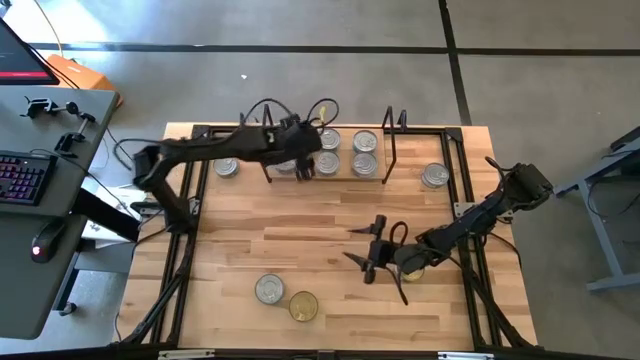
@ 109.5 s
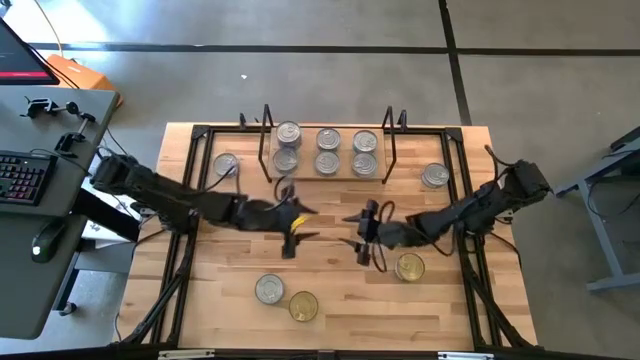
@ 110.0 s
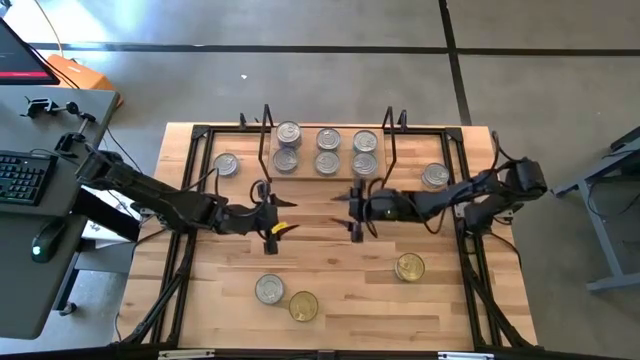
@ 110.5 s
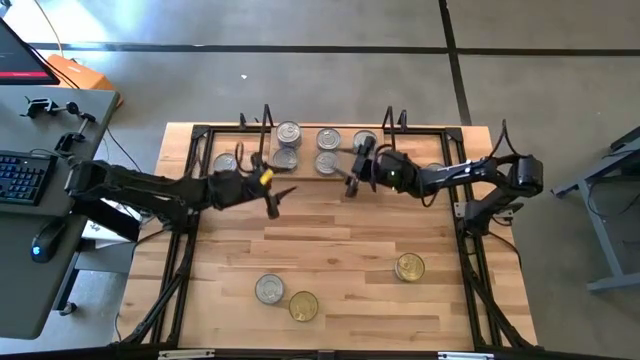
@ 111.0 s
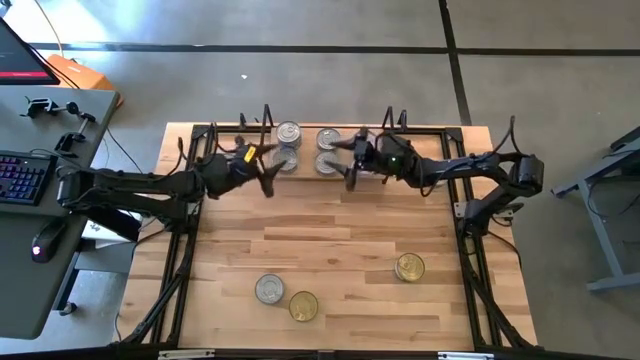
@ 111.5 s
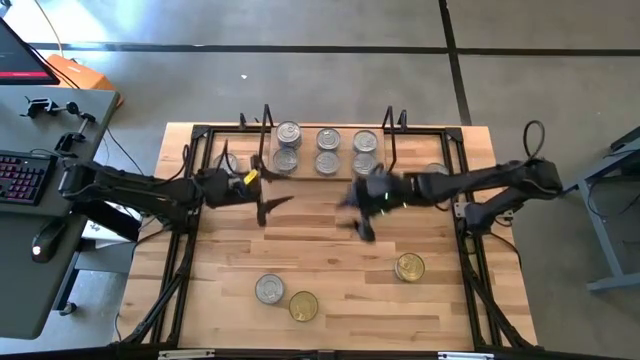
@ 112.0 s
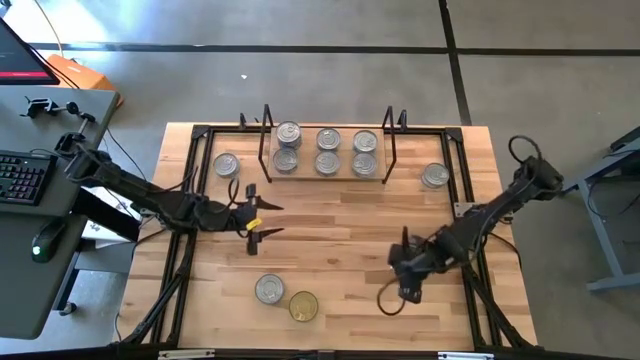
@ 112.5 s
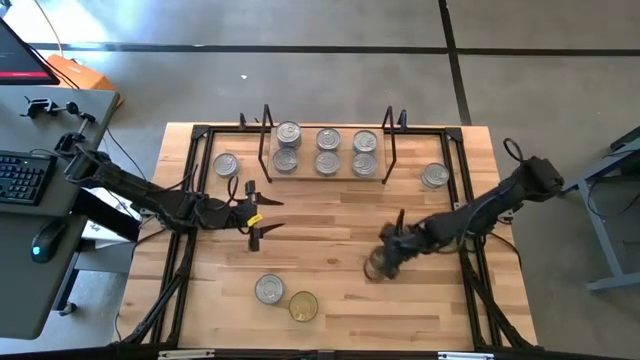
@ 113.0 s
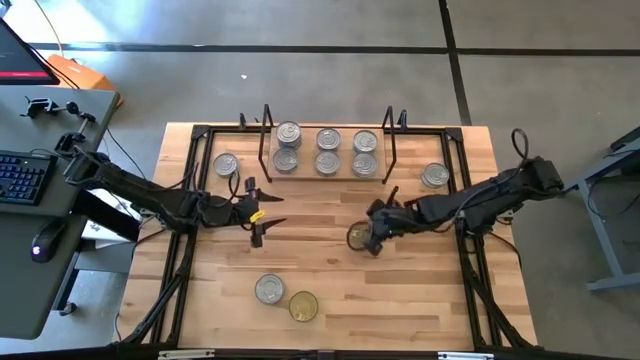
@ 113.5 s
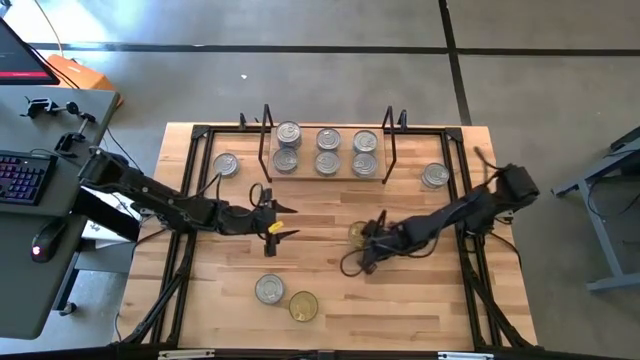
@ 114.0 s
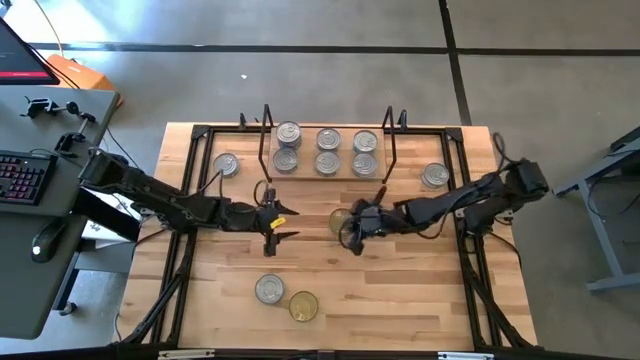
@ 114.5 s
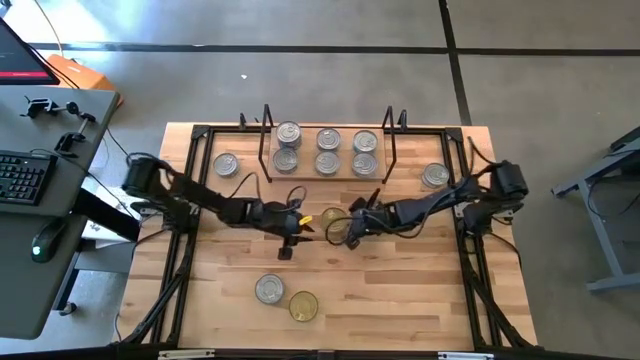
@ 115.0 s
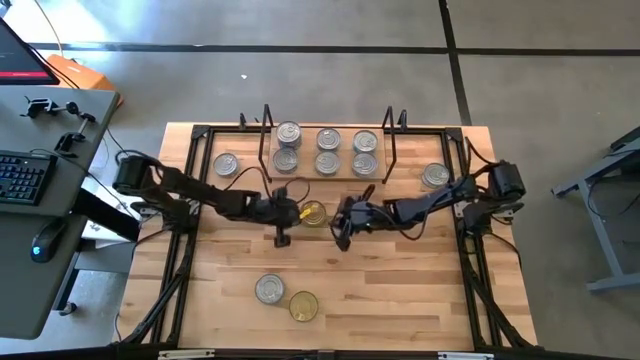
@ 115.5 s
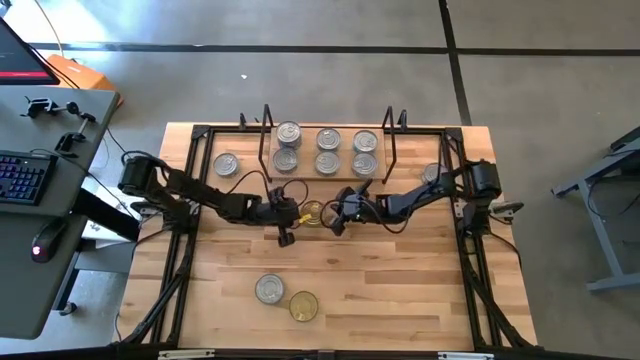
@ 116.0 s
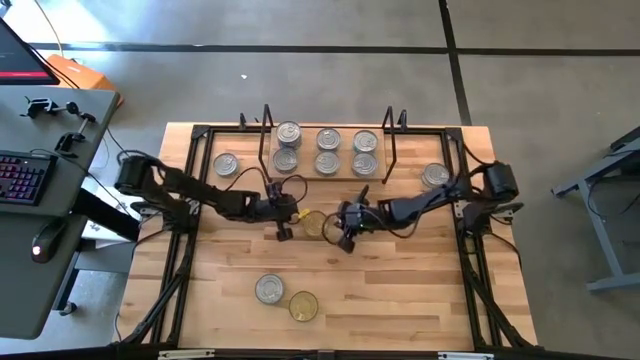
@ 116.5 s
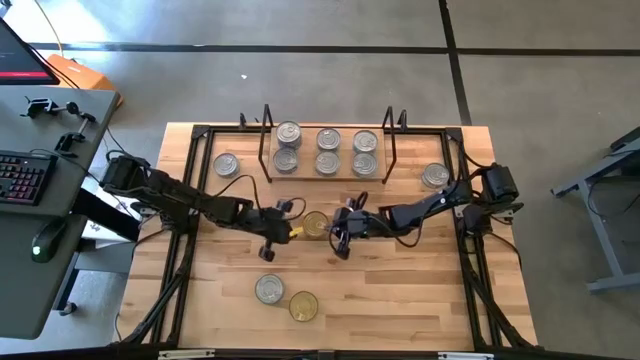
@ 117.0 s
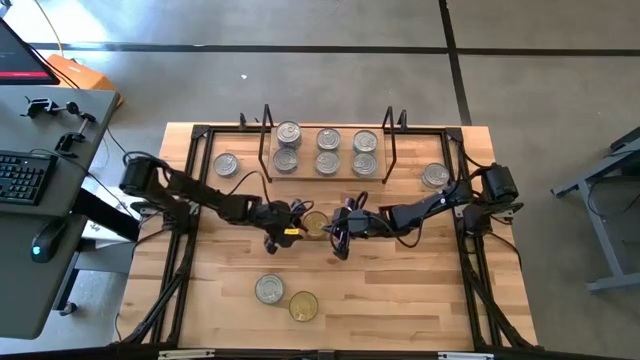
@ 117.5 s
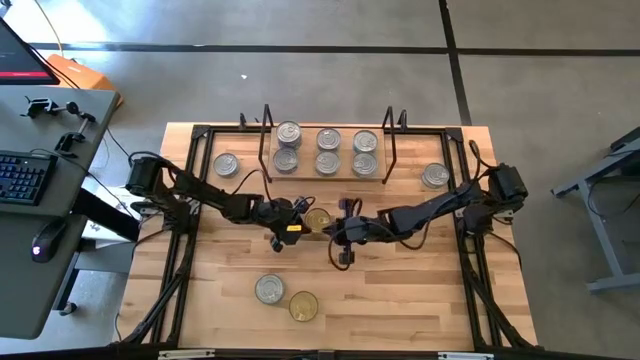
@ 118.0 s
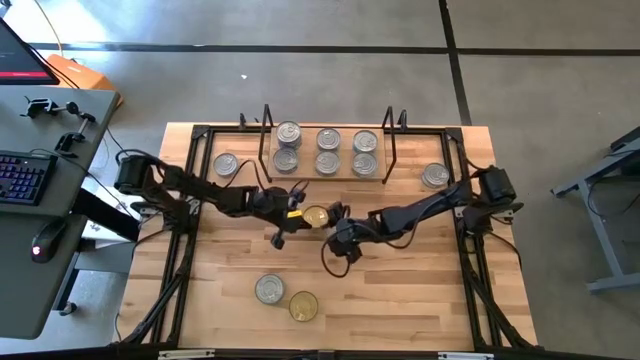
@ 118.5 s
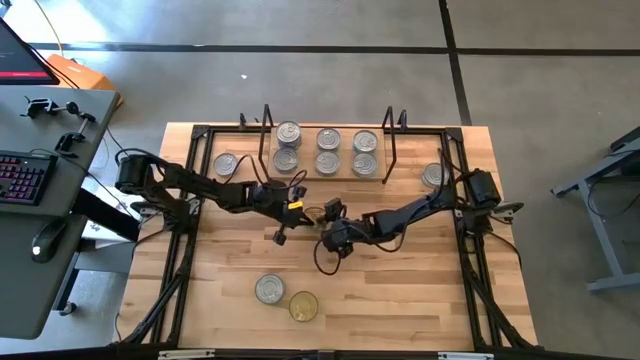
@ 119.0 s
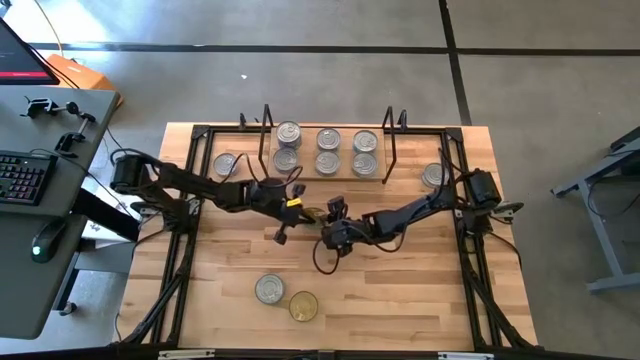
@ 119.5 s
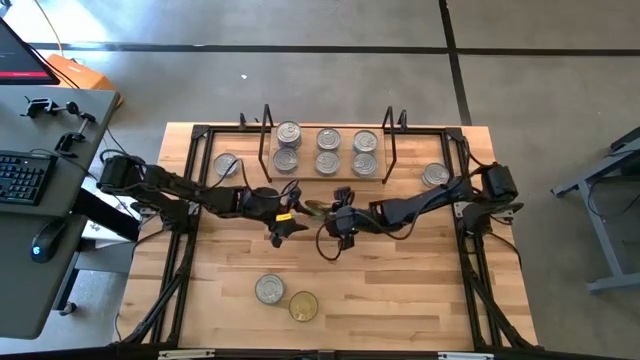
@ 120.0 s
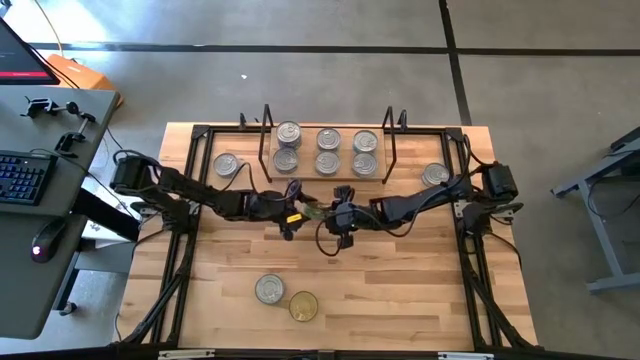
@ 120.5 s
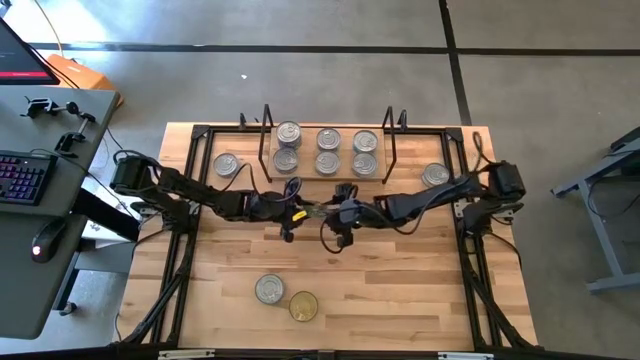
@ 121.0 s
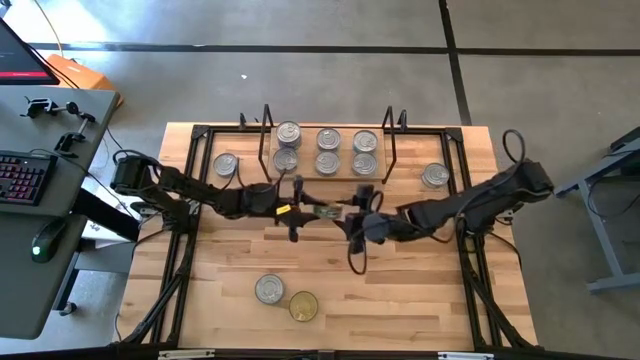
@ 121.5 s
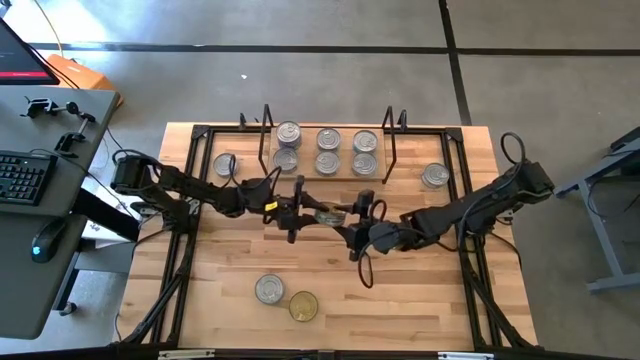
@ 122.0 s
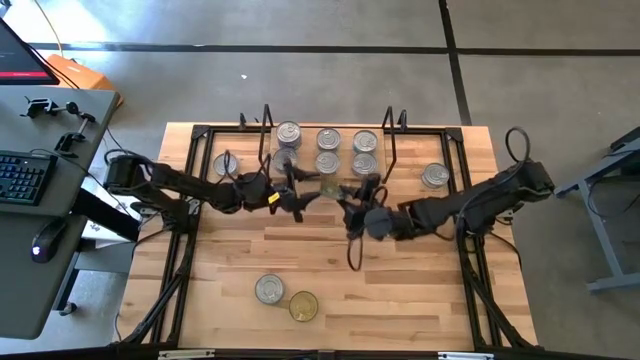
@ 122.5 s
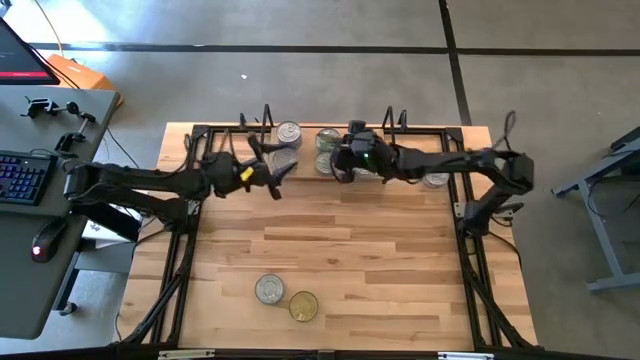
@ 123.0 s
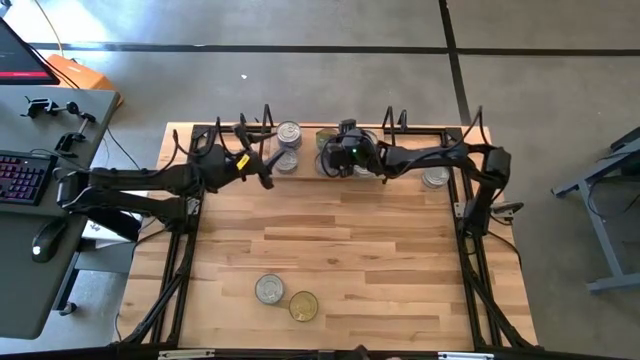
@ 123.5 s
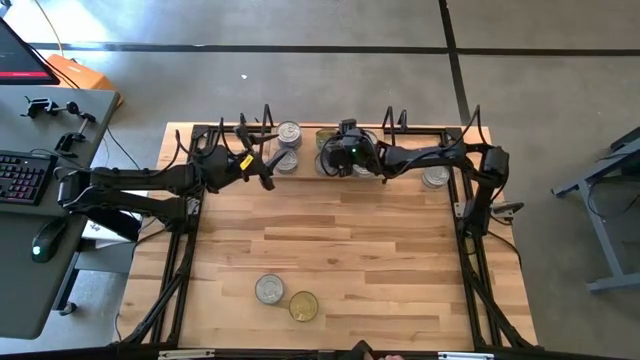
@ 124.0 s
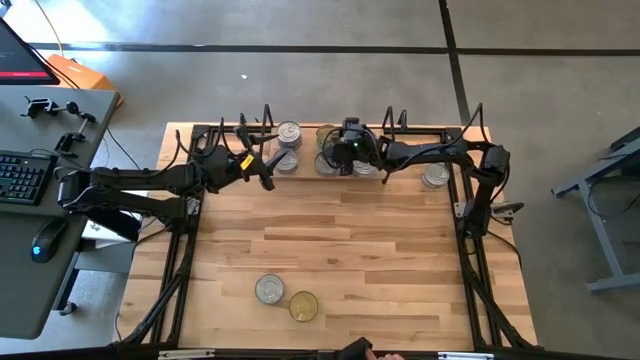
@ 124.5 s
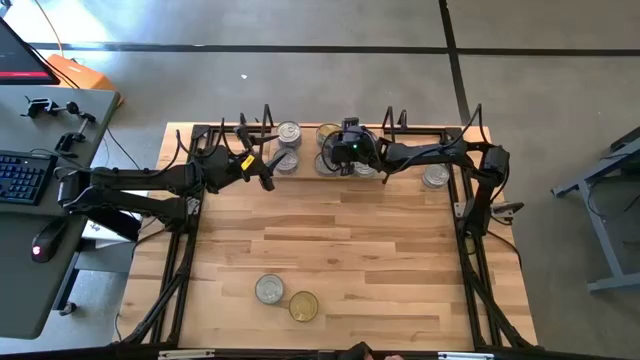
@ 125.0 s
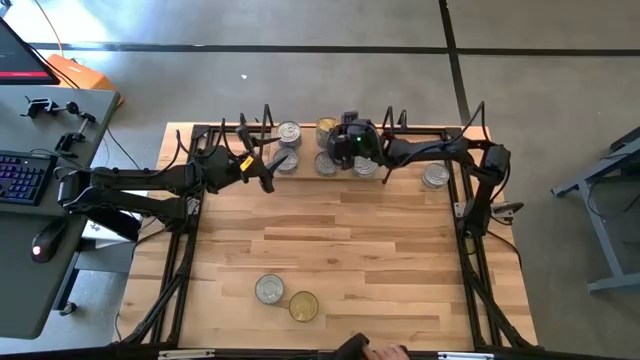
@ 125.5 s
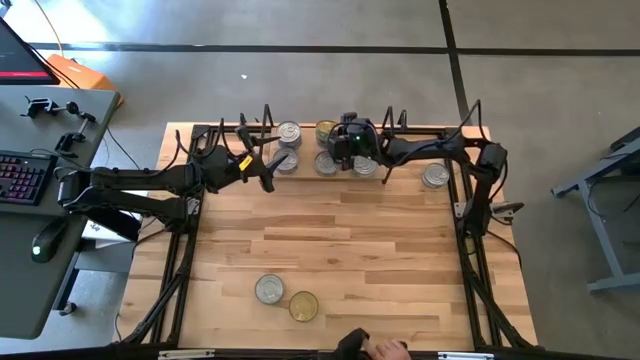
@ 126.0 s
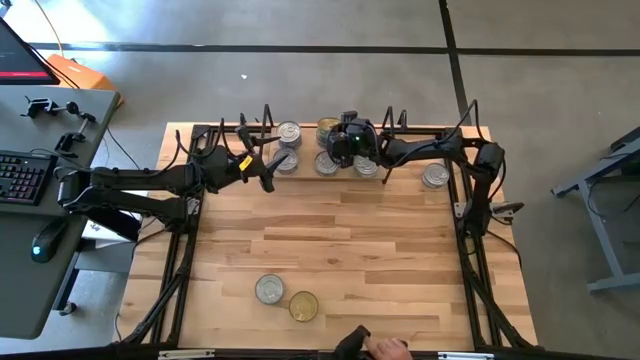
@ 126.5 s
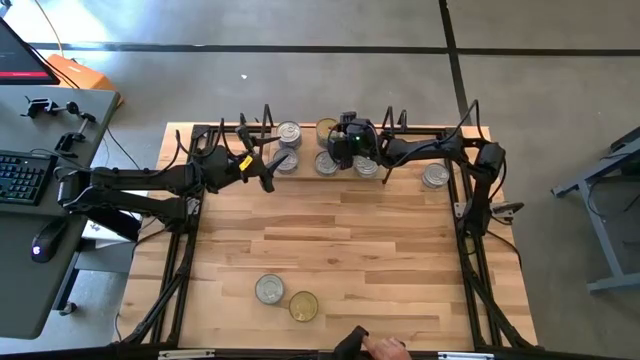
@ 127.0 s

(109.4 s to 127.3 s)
Task: Stack canned seafood by type on shelf
Stack the green tuna can on top of the other green tuna can on the shelf
